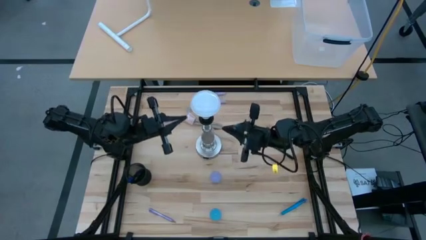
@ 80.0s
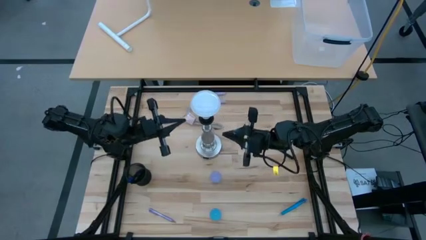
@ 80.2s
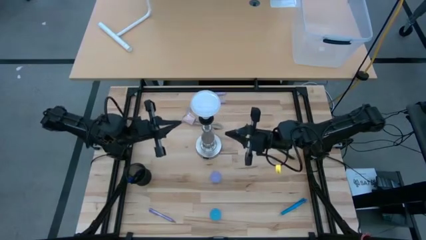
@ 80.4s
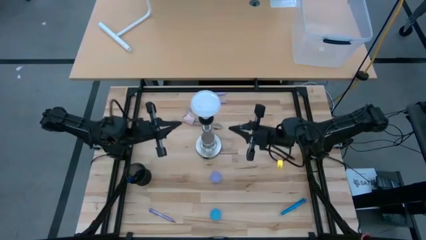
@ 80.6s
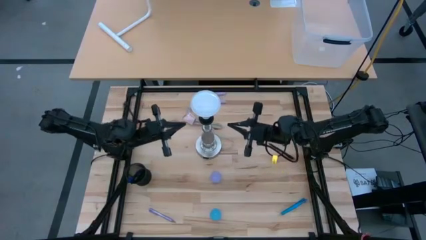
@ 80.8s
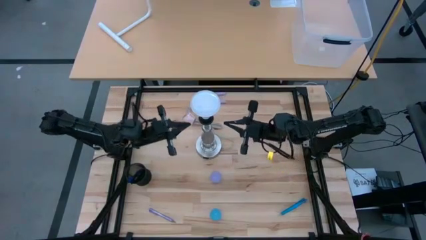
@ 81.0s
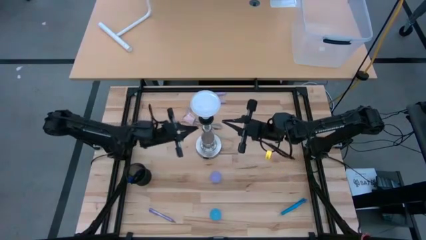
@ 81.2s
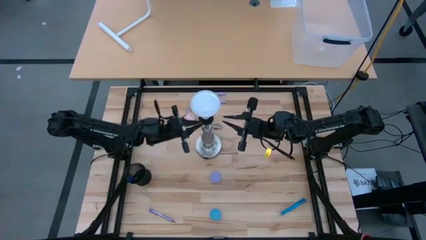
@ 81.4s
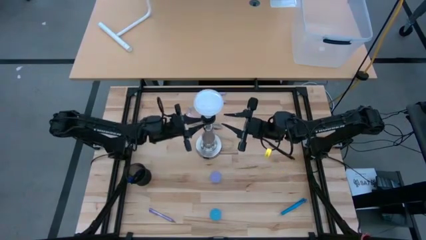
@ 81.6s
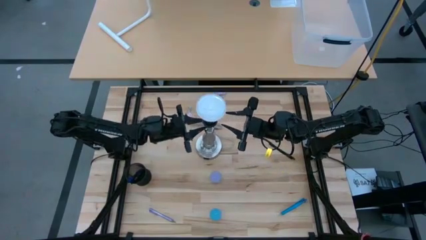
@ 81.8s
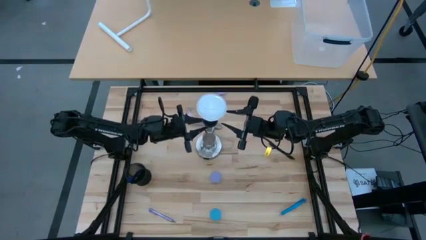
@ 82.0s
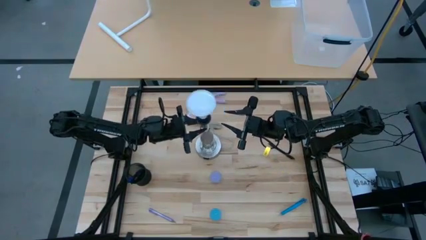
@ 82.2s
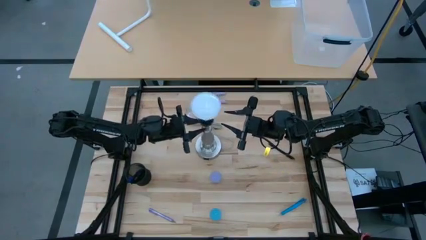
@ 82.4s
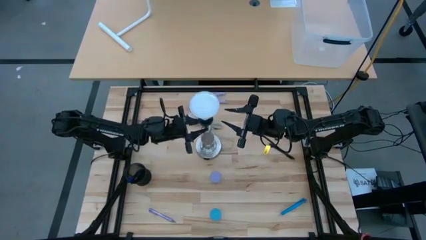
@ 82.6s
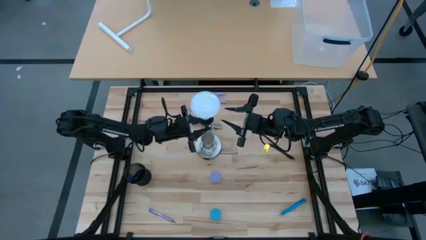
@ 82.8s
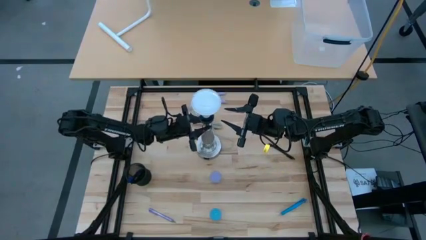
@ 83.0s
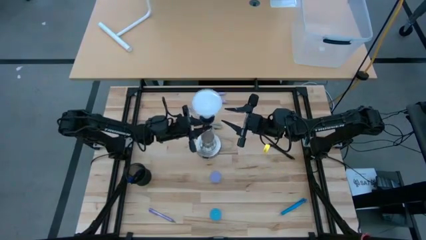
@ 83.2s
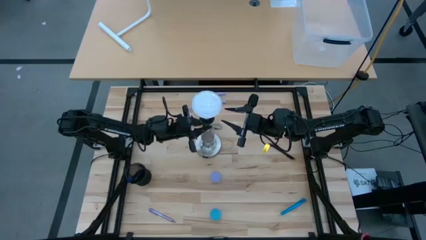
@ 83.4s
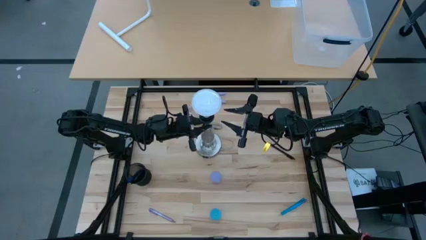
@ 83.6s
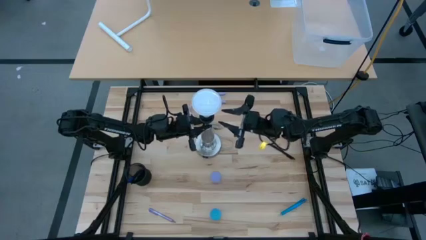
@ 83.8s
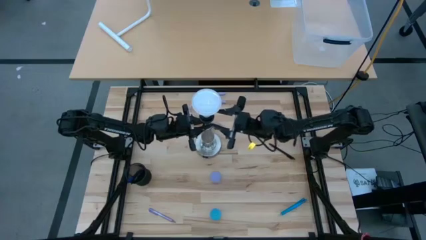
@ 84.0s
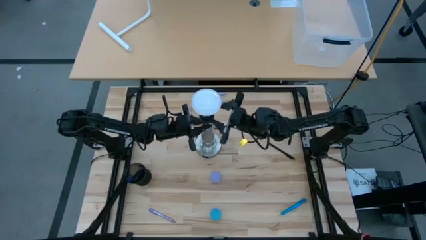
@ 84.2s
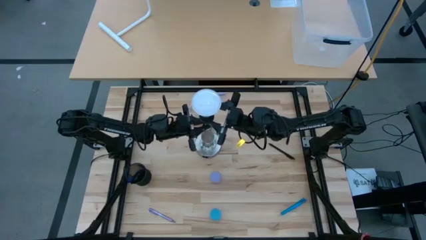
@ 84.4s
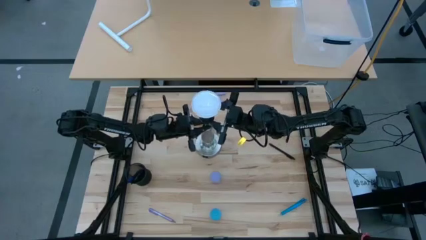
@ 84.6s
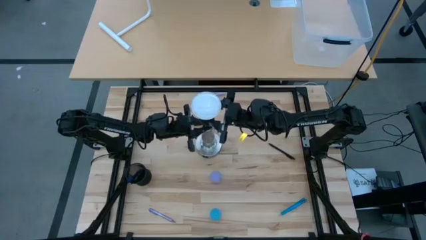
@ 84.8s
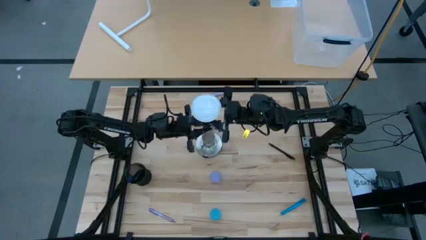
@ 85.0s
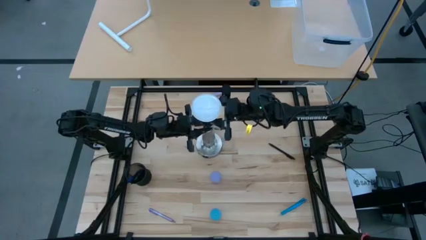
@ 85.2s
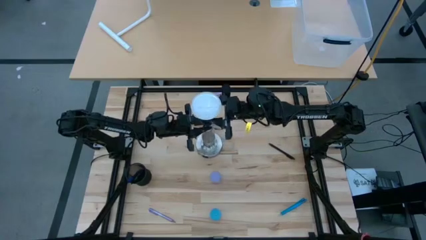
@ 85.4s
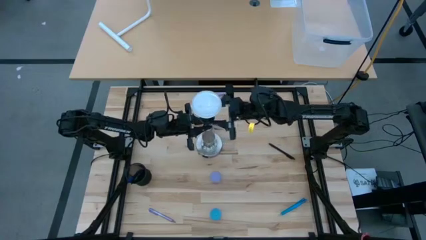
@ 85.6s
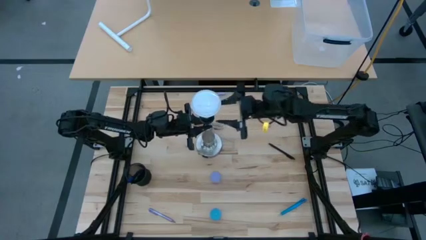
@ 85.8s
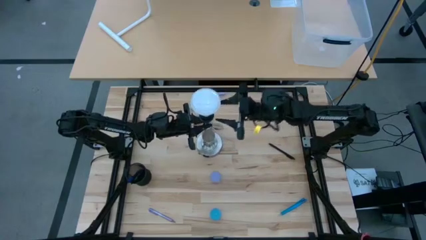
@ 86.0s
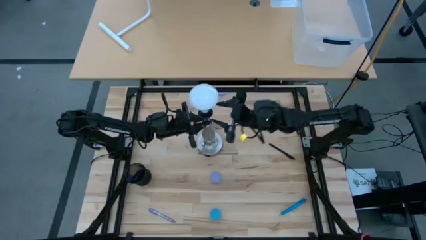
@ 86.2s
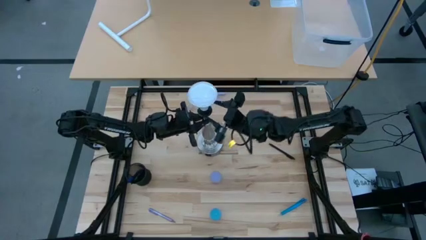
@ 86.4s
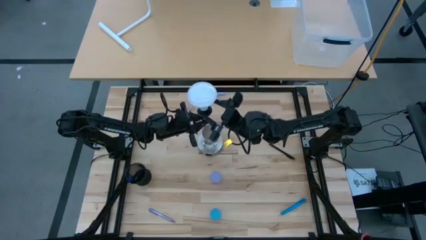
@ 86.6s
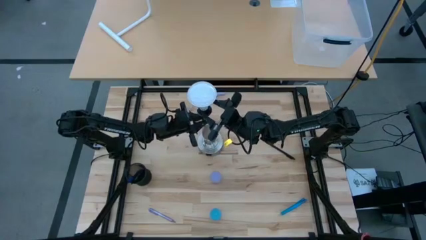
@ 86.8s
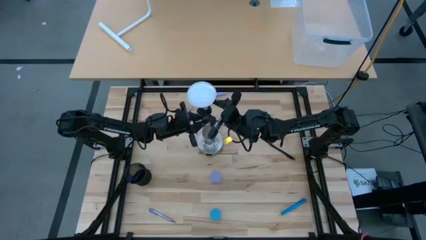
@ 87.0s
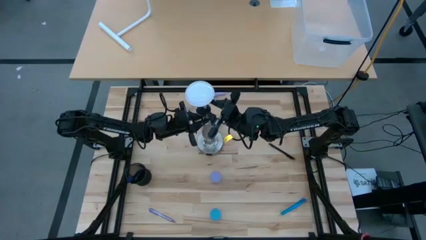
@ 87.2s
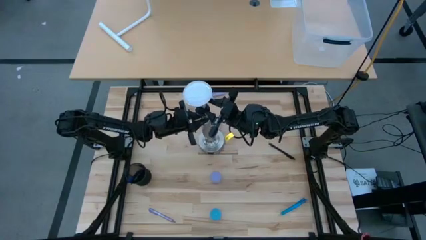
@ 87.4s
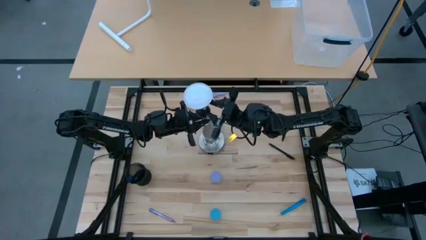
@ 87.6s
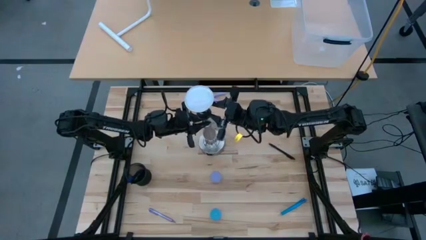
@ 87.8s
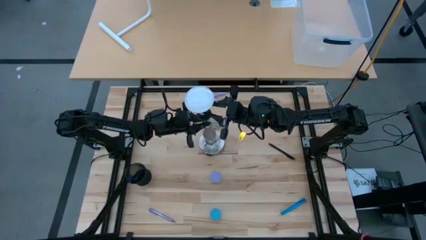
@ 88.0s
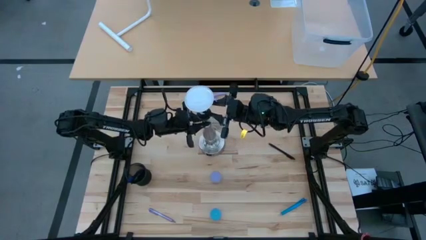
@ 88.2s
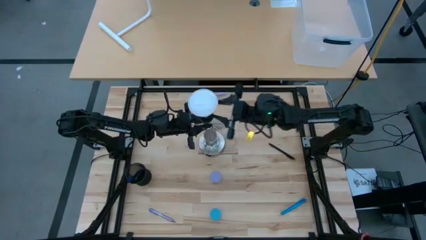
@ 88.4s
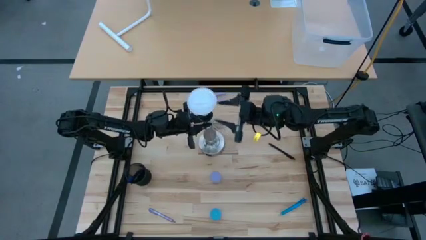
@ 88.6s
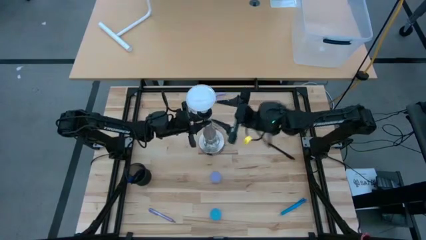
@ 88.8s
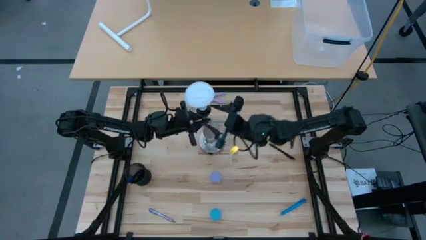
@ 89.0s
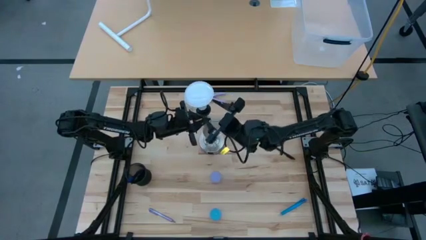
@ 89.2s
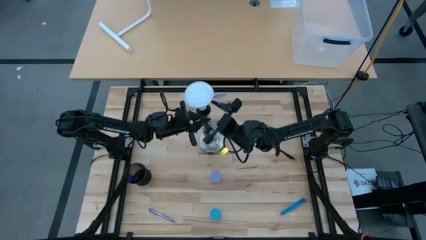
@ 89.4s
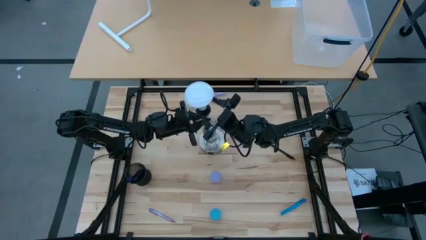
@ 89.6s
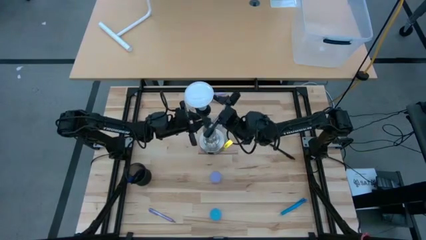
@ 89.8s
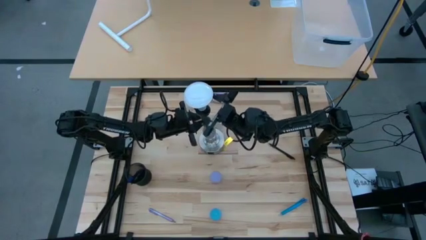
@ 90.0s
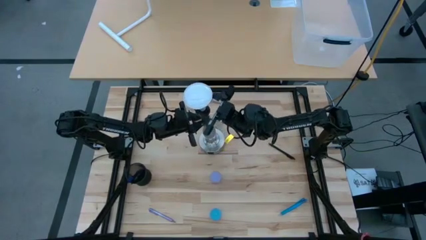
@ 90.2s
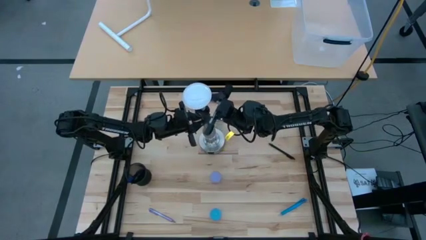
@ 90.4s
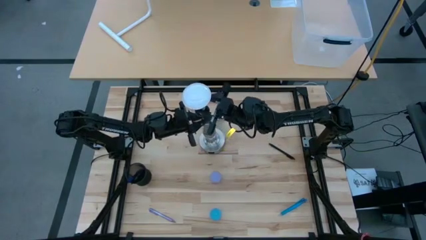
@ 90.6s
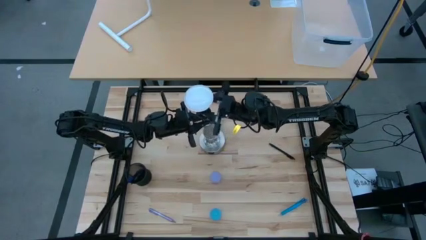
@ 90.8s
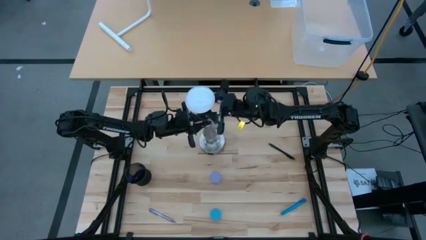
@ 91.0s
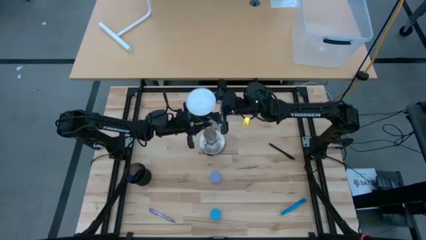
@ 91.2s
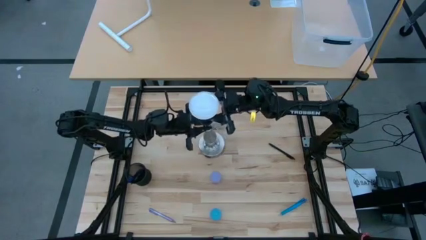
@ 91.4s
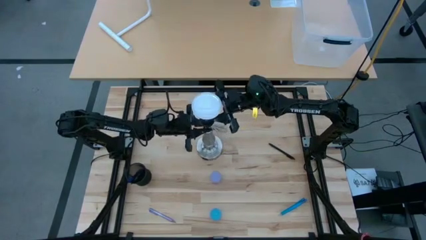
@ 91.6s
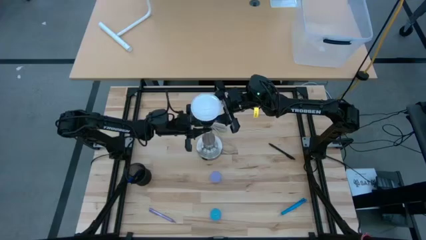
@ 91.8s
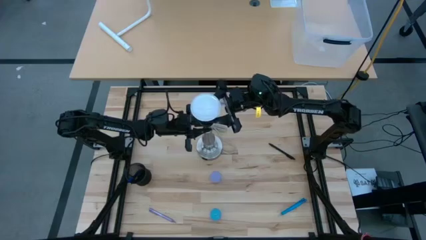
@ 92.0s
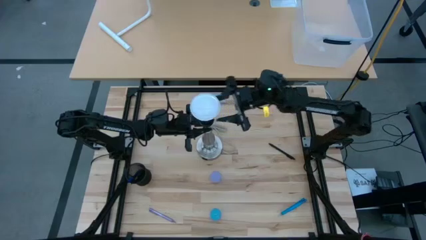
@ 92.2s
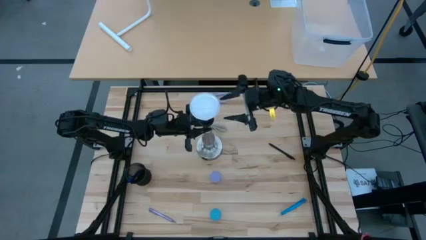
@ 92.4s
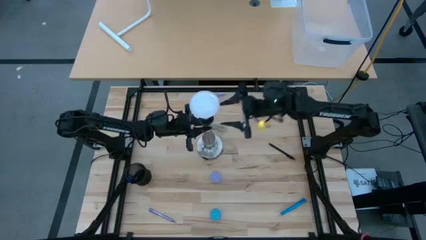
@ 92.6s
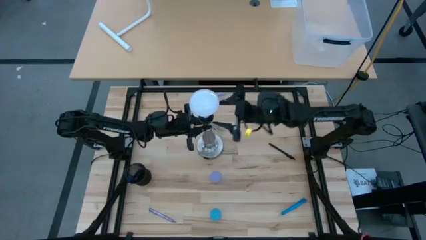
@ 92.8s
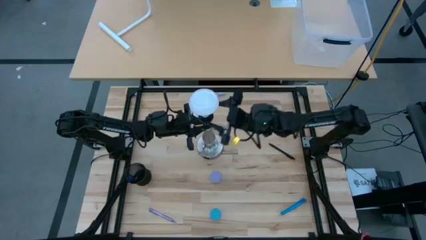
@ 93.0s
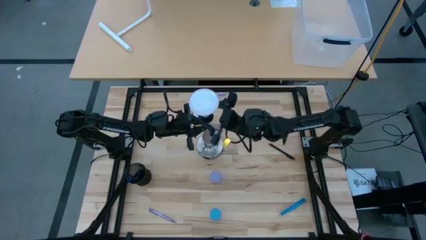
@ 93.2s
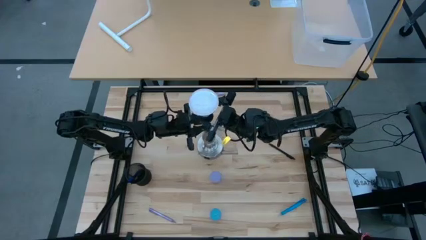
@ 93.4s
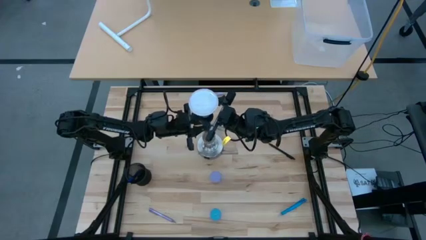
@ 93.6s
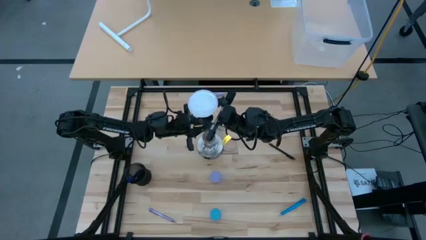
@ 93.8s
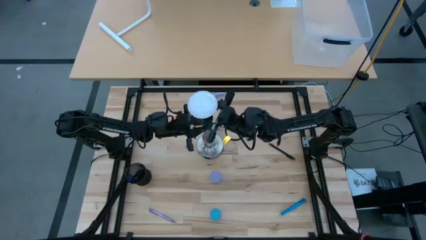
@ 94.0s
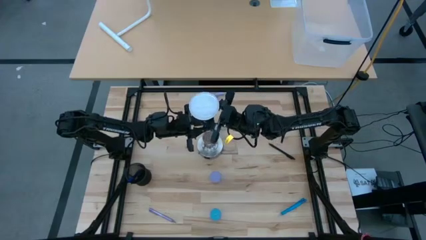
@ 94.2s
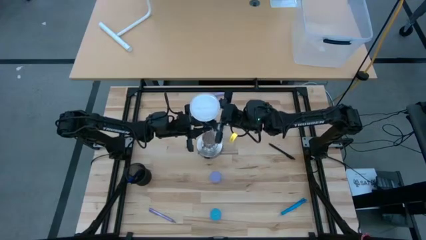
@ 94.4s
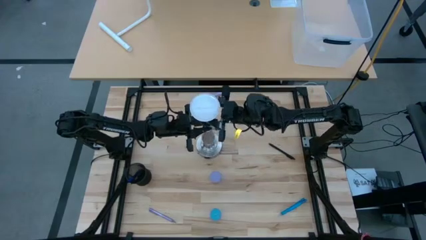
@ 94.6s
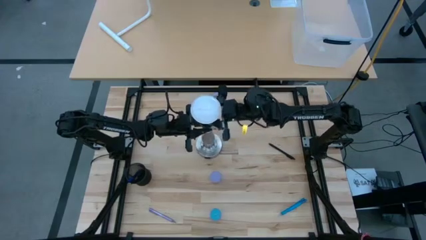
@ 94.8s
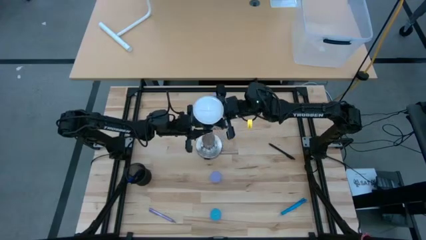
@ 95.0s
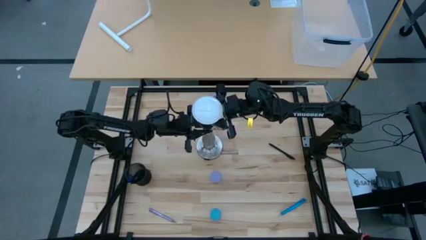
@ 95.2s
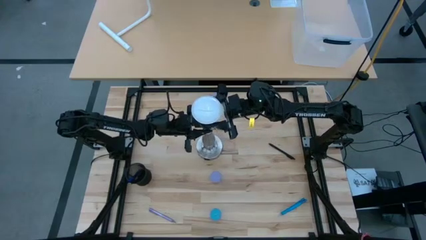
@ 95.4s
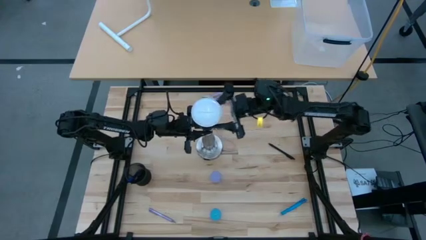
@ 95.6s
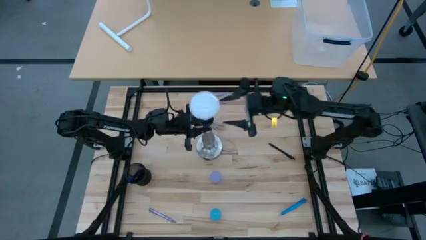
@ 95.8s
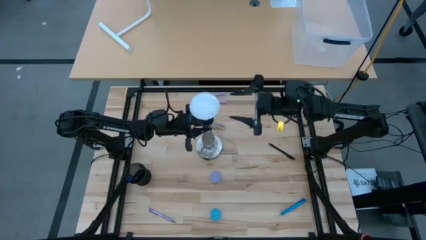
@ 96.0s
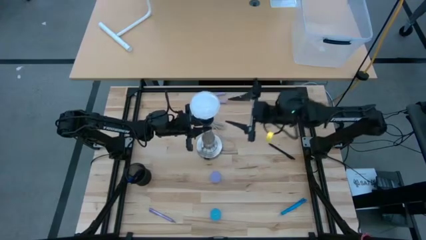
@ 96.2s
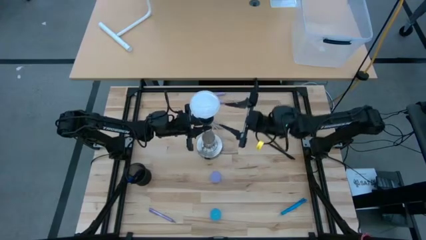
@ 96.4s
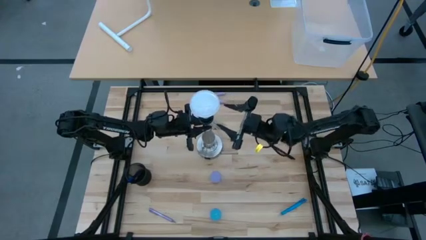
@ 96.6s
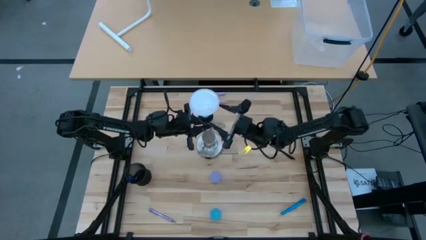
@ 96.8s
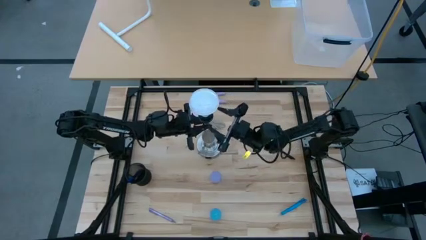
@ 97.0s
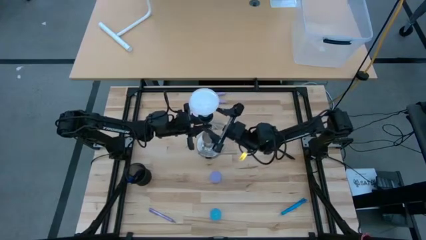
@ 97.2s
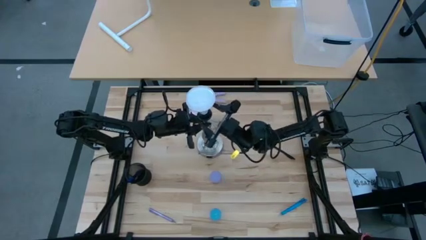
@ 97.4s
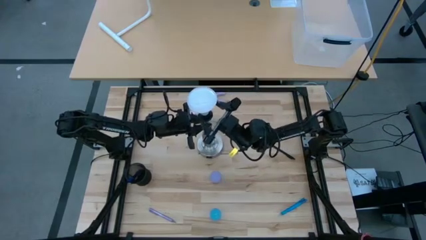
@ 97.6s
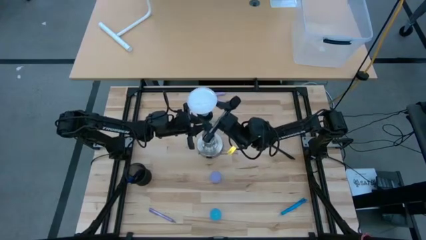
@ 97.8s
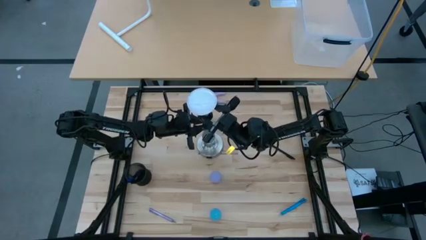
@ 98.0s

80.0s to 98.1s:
Task: Screw lightbulb
Remove the lightbulb from the silver lamp socket
